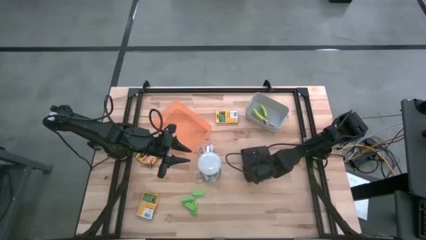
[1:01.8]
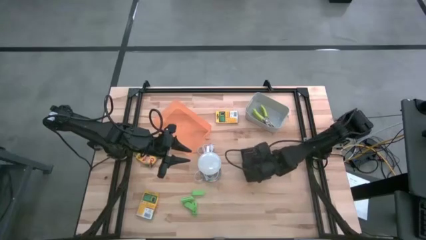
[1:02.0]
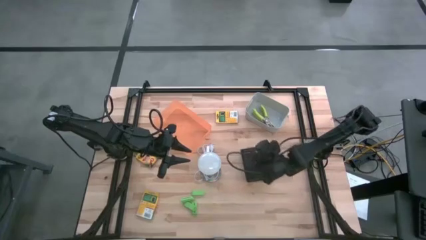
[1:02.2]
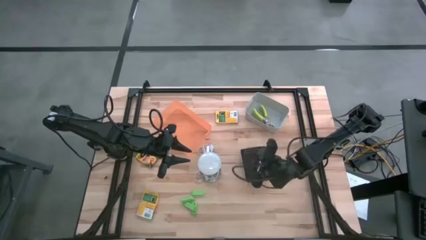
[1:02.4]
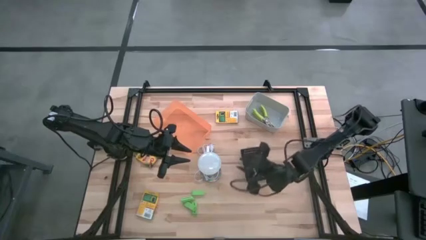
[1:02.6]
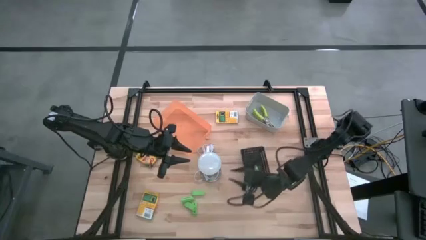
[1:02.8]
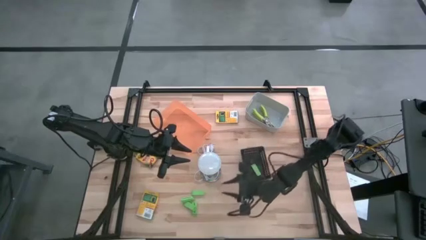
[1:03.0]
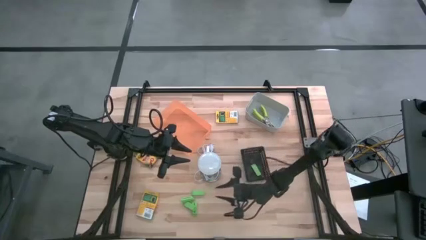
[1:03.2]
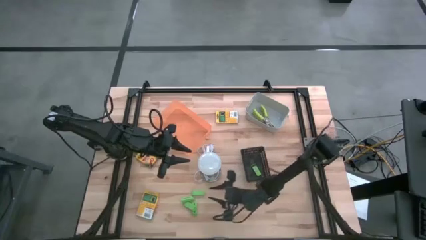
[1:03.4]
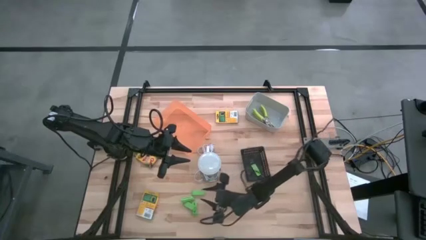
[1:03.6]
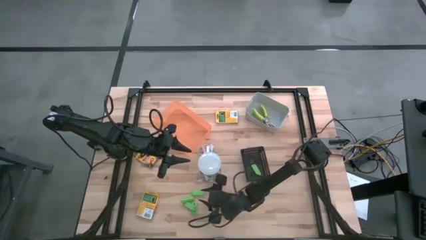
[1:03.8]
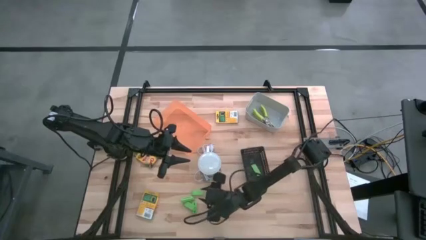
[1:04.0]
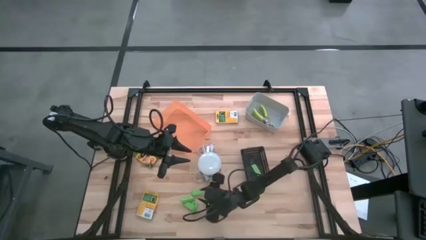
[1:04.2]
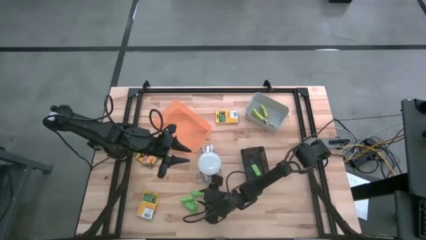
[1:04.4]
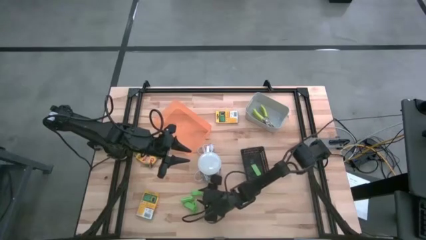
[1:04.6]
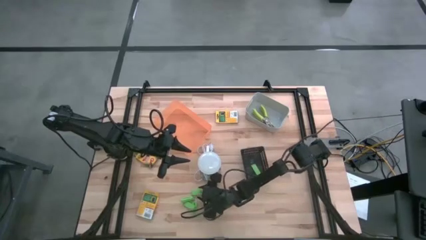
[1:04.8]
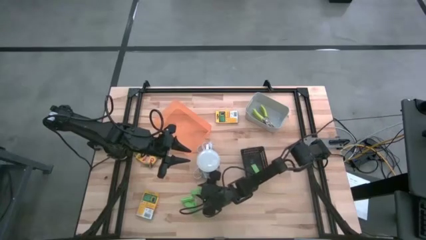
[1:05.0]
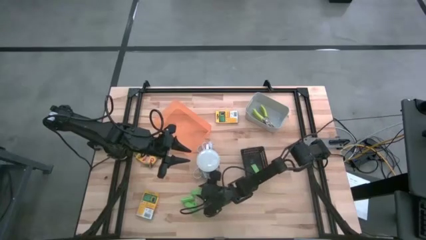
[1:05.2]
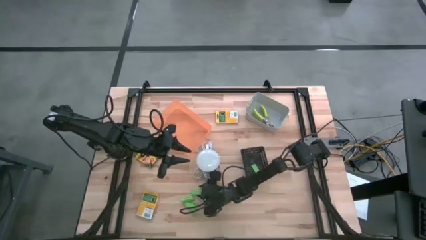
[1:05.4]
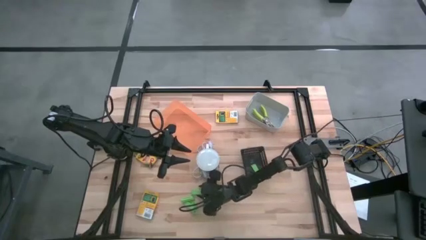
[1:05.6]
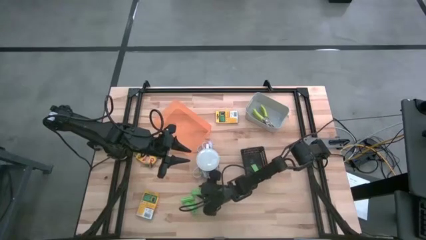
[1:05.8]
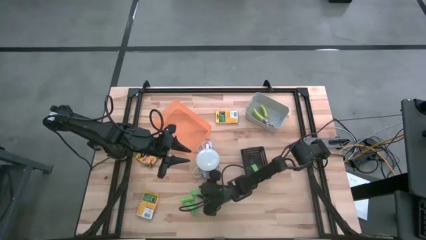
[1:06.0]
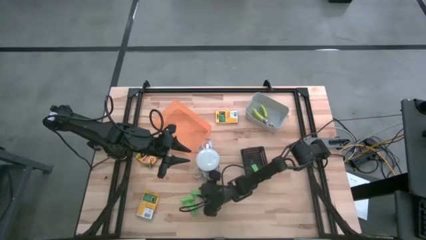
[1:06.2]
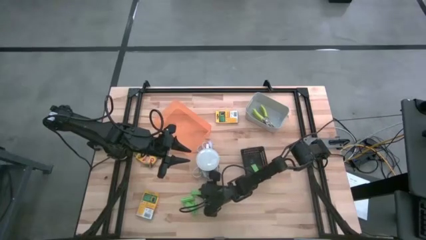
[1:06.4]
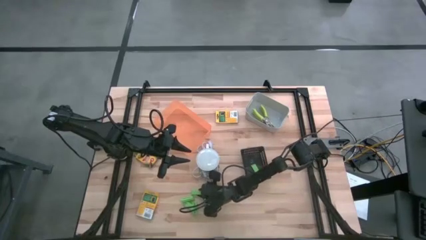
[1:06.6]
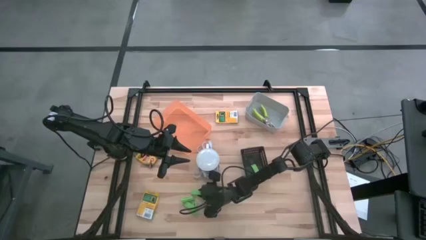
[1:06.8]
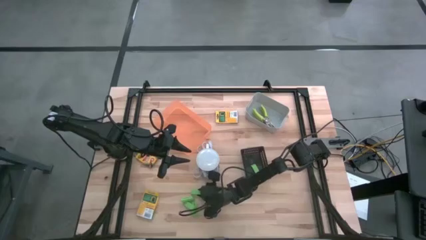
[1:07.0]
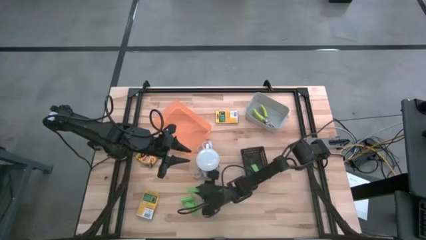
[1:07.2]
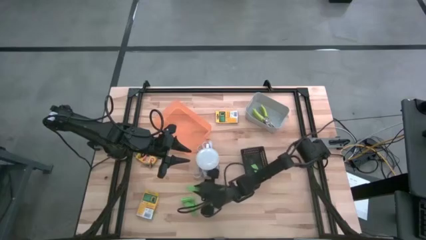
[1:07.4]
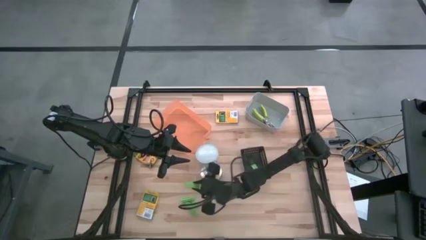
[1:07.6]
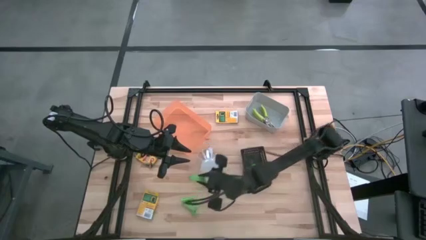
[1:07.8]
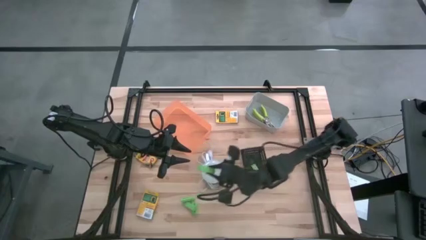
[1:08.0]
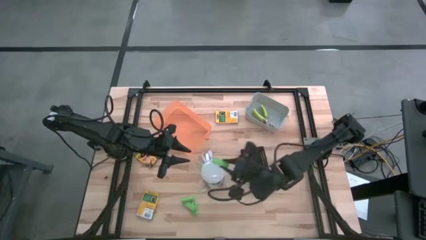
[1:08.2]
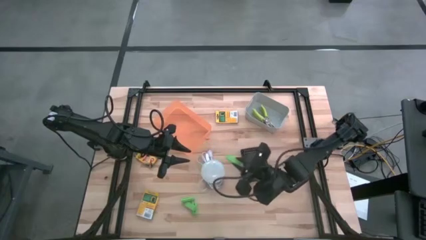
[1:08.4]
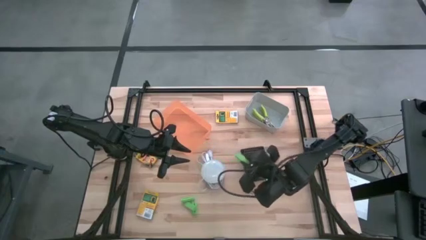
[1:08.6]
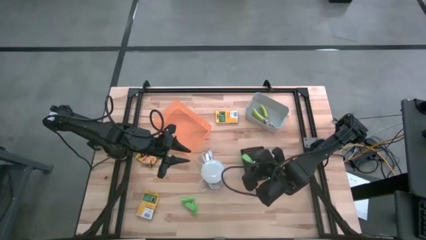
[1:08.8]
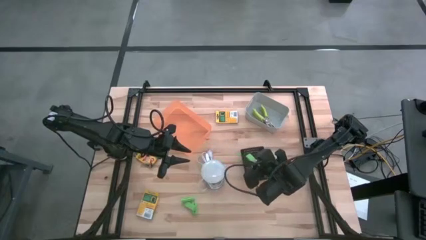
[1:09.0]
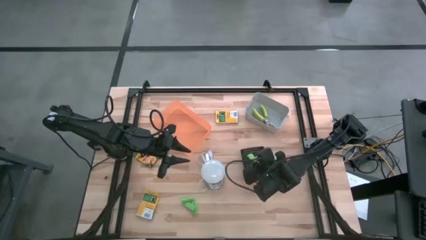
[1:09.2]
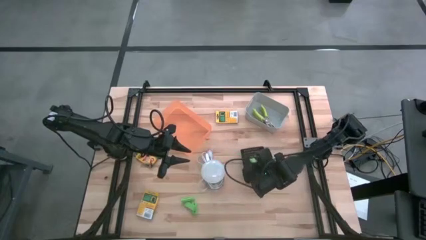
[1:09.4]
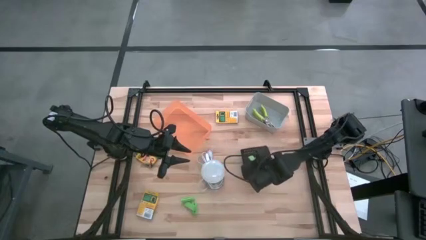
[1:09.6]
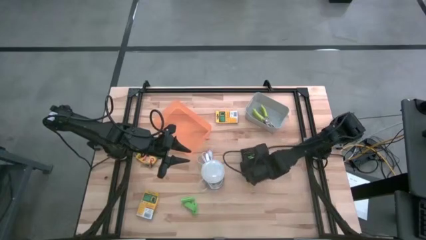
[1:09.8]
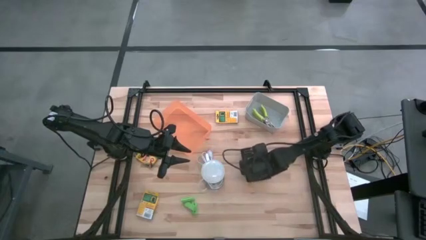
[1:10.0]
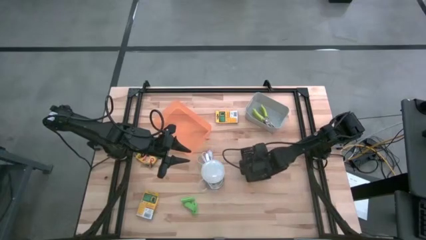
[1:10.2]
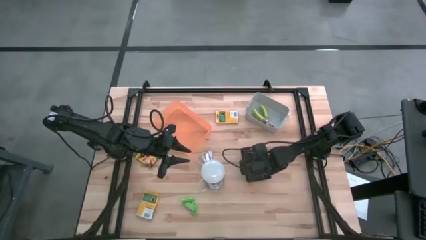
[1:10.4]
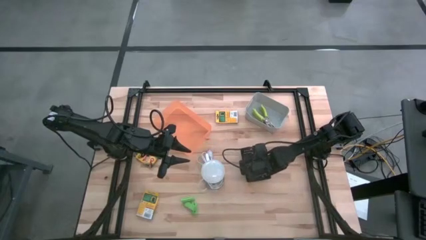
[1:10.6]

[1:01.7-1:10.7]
Task: Pick & Place School Supplies
Put the green eraser into the black bin

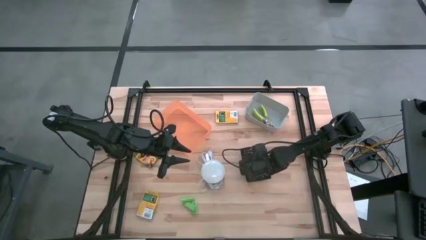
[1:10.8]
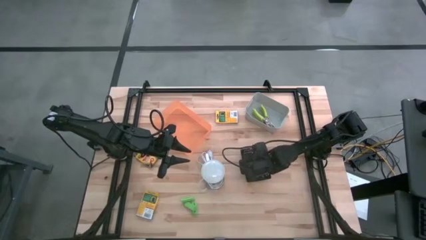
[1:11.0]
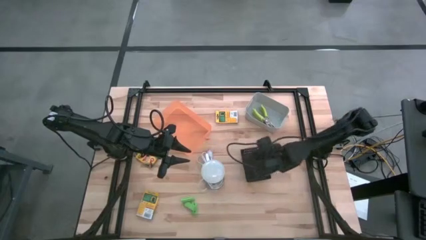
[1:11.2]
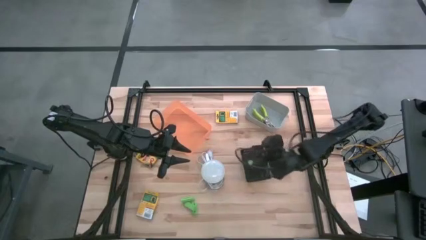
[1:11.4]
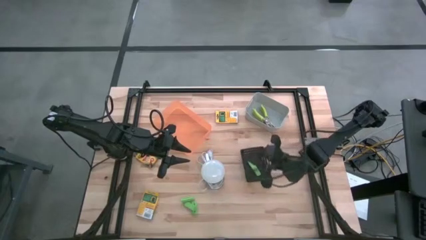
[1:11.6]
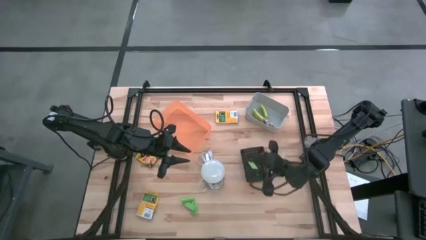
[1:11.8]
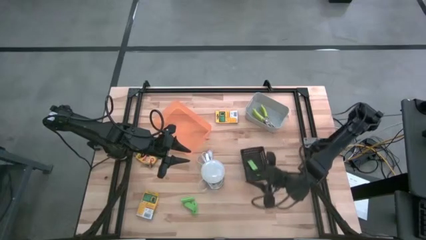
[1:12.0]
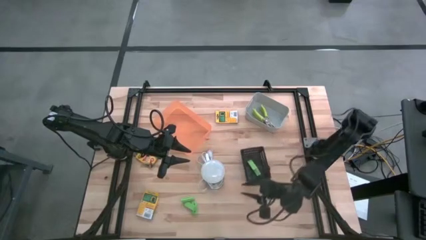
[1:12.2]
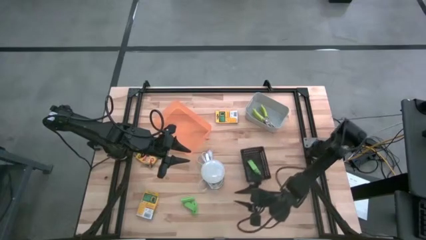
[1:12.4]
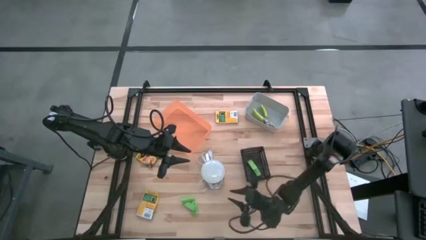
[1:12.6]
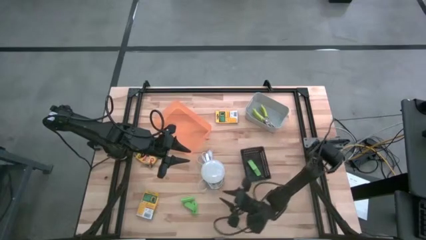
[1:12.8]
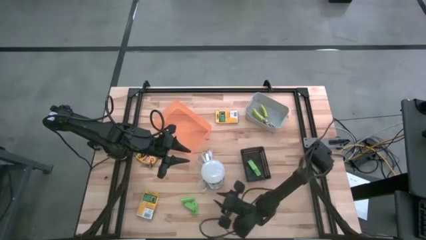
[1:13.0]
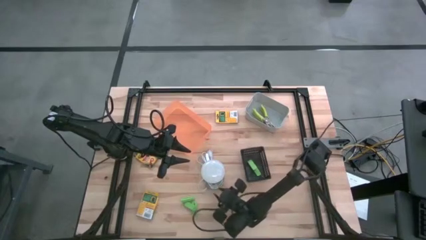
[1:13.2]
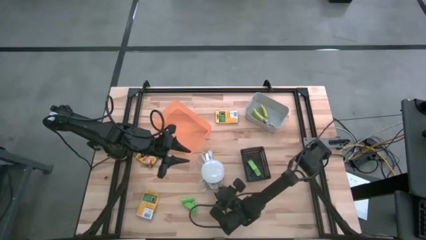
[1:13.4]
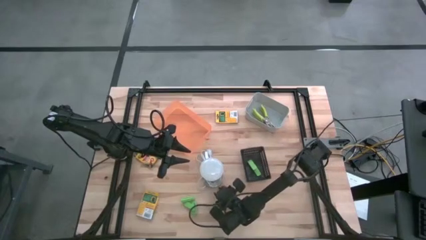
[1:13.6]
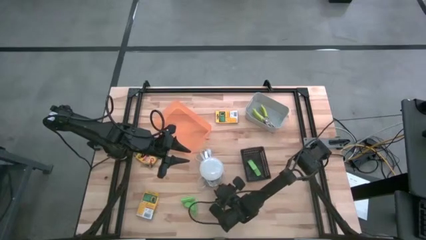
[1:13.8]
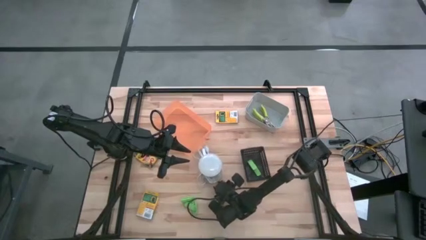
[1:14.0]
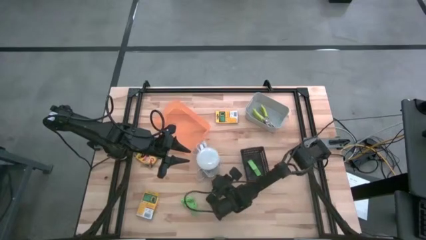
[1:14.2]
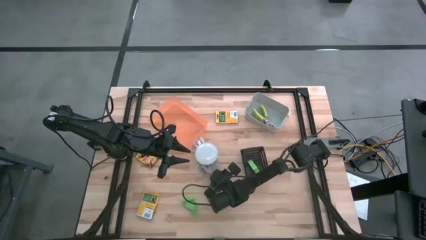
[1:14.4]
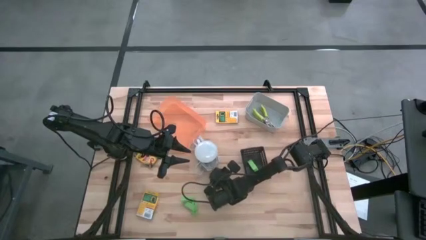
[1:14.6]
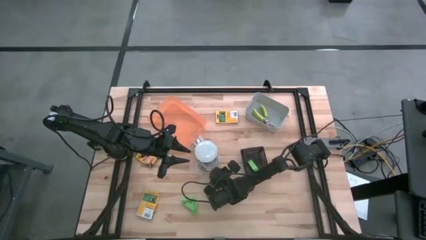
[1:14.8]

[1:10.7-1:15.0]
Adjust the desk lamp

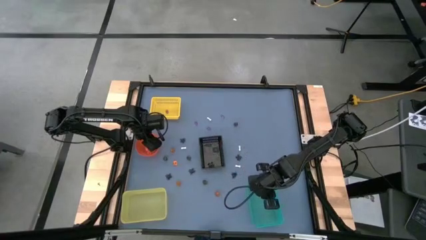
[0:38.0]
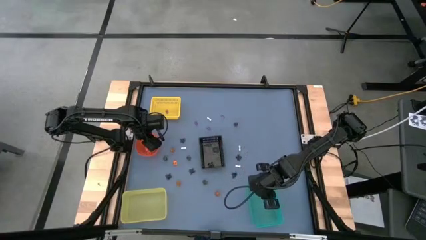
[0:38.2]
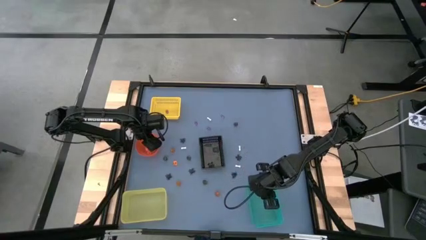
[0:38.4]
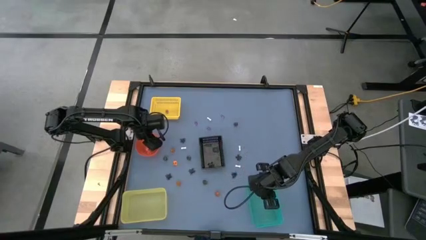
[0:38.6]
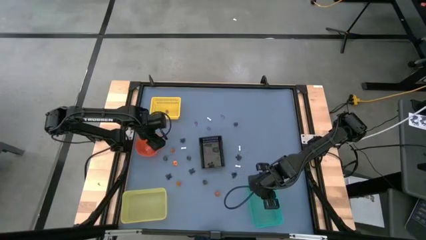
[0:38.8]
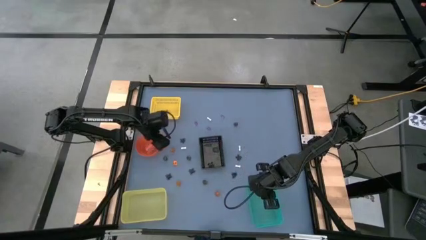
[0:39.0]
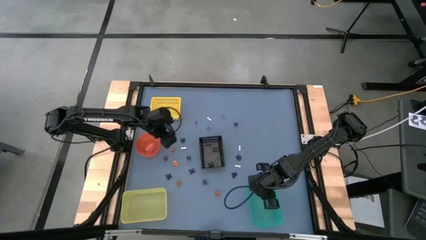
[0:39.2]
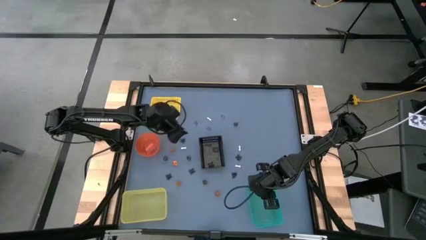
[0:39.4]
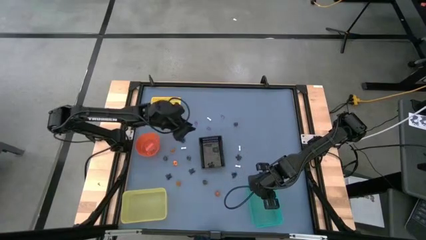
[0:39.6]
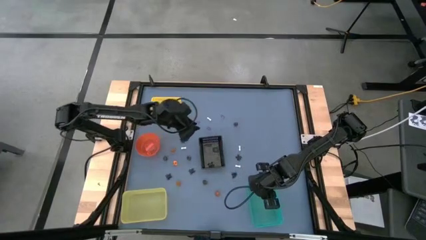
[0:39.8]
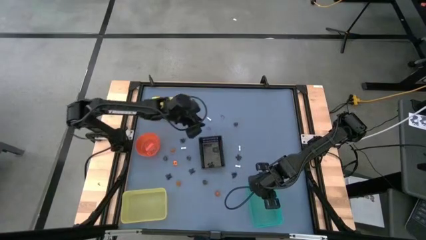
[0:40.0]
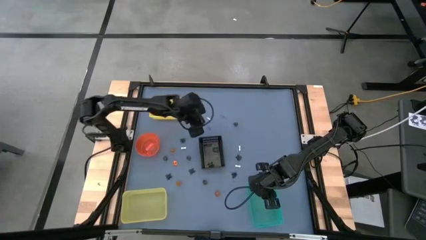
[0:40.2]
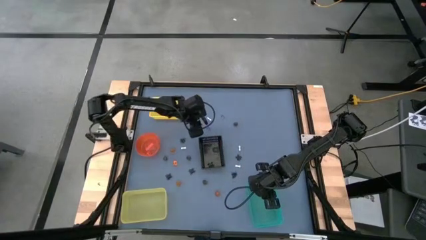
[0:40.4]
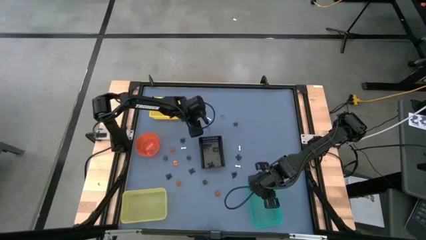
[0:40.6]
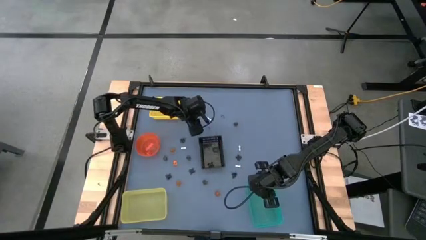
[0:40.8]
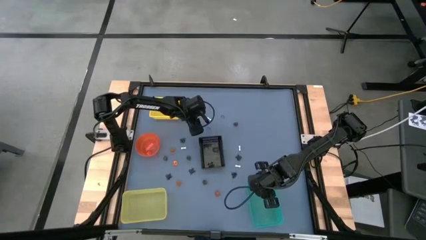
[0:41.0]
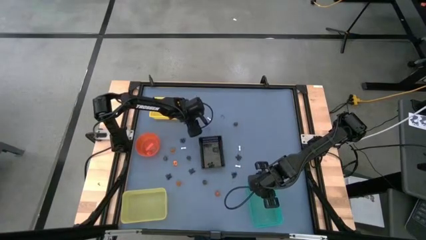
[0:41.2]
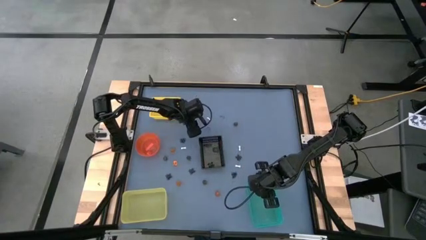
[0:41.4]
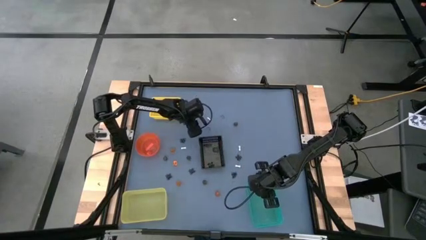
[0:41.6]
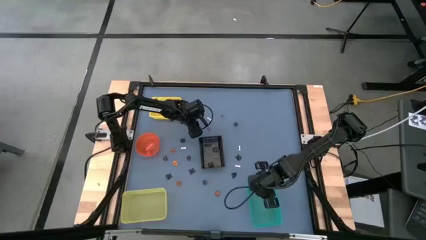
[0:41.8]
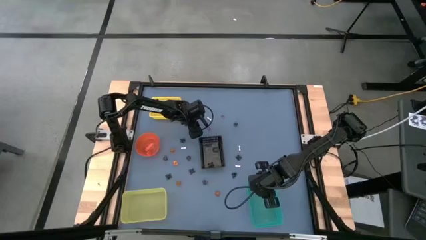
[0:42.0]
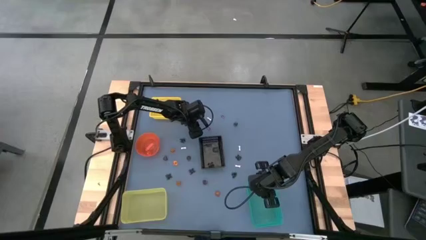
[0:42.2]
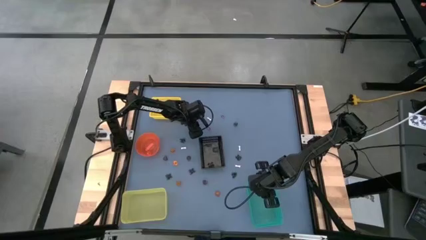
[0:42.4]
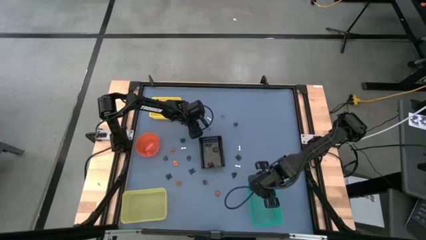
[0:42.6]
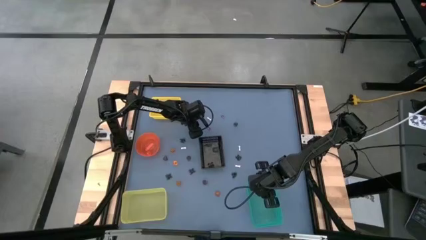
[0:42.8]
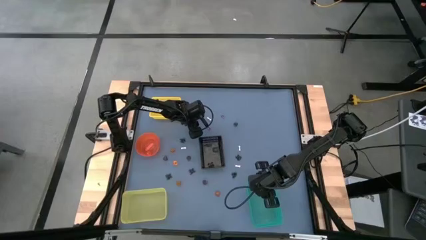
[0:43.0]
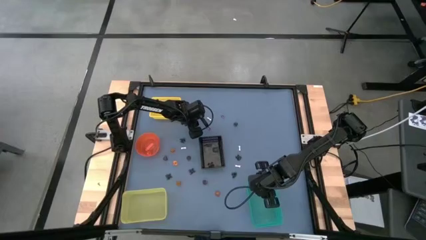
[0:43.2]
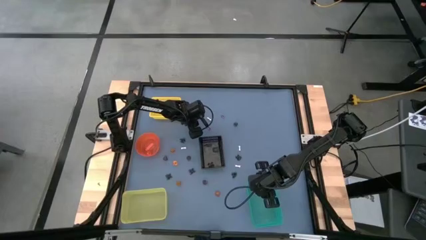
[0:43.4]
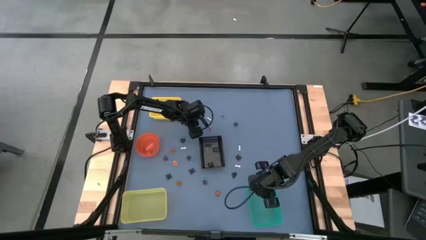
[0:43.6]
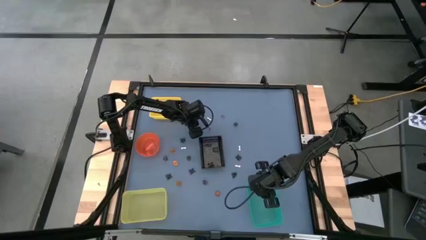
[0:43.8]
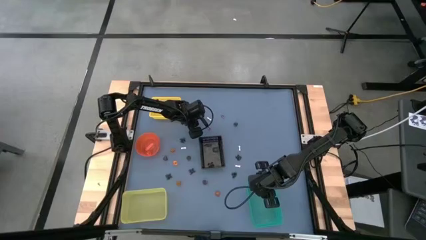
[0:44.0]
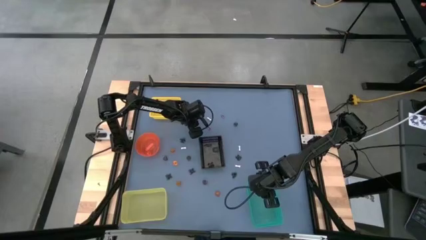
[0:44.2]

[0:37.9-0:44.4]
Task: Sort Halloween decoration
Put the violet witch hat toy into the top yellow bin
